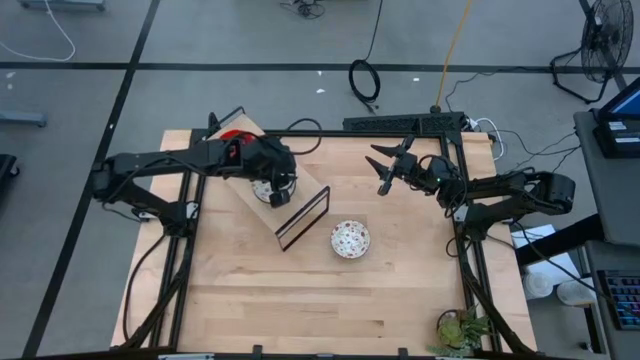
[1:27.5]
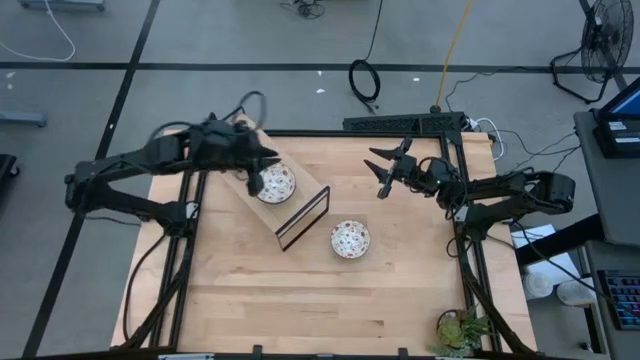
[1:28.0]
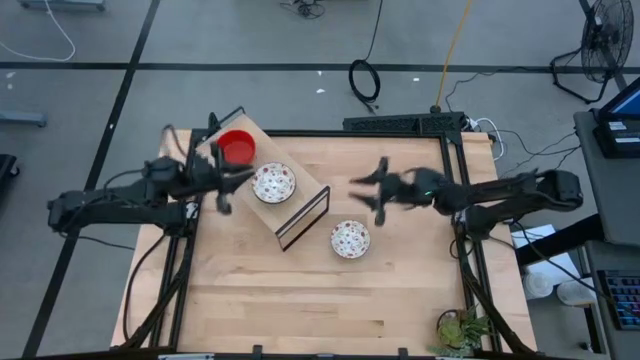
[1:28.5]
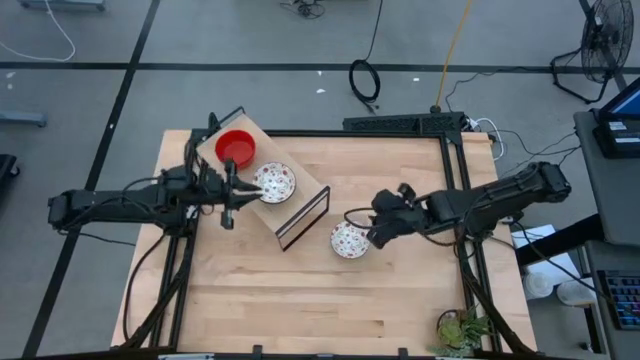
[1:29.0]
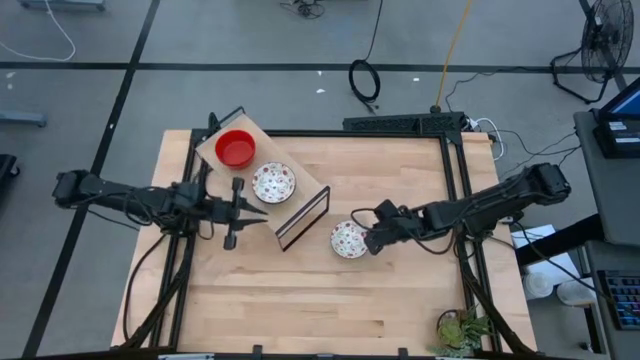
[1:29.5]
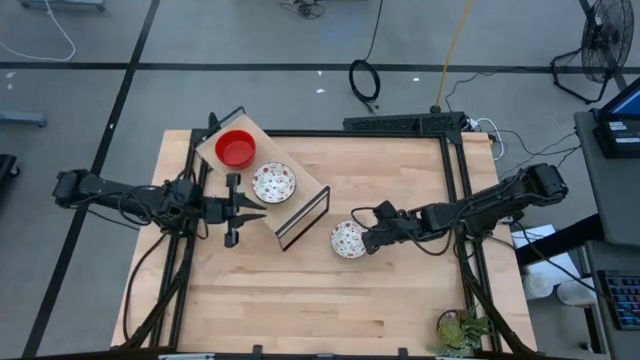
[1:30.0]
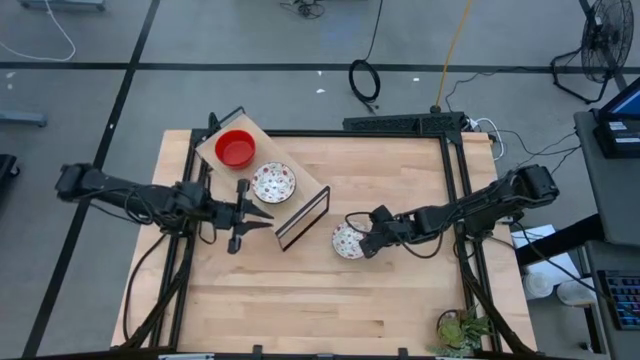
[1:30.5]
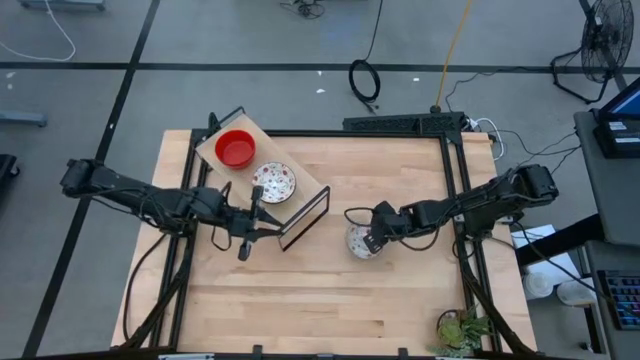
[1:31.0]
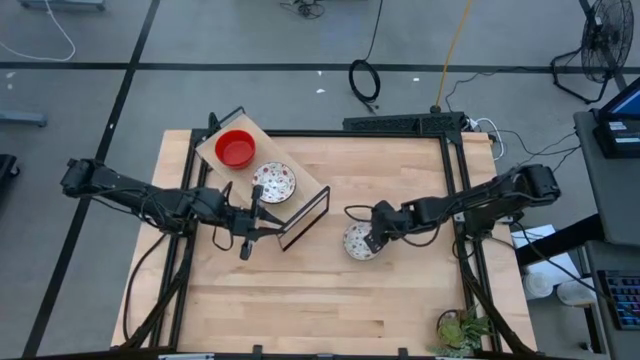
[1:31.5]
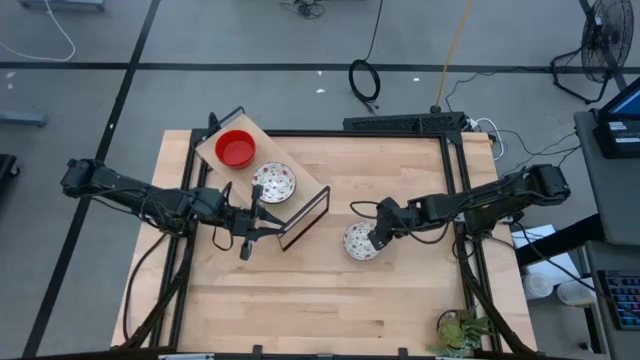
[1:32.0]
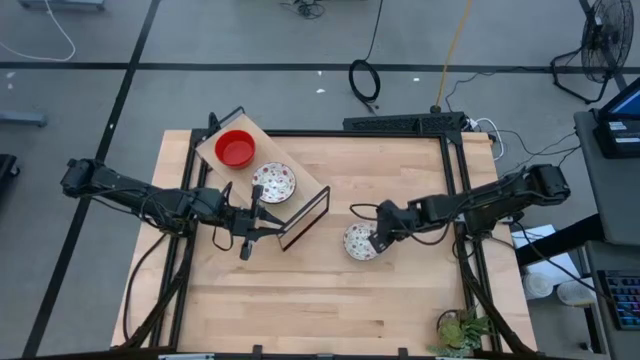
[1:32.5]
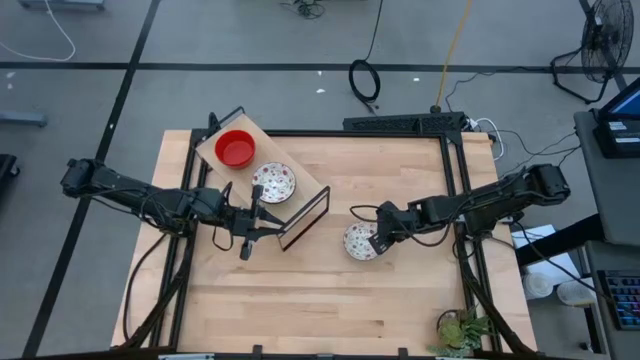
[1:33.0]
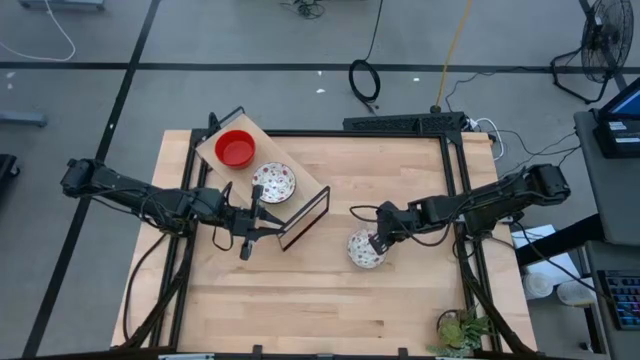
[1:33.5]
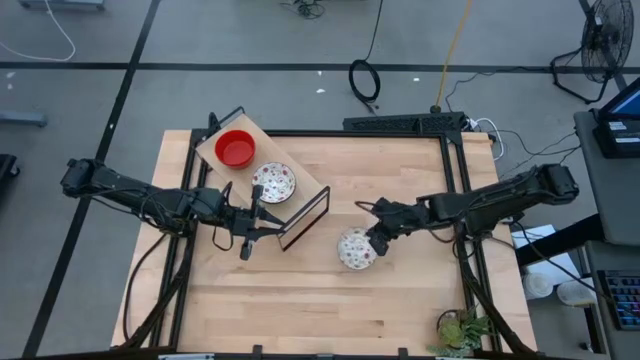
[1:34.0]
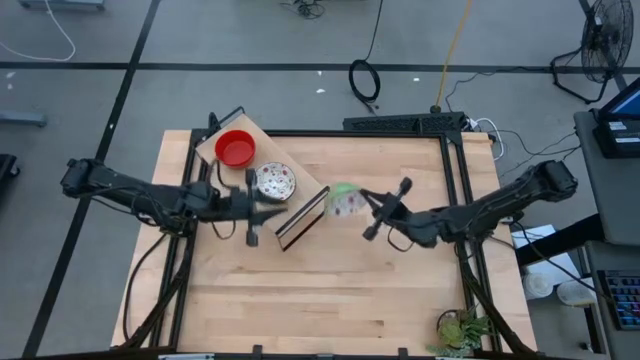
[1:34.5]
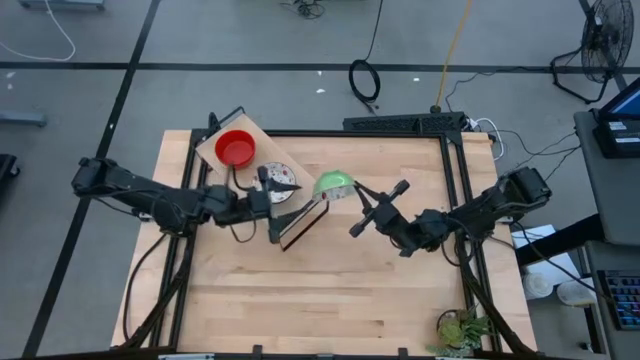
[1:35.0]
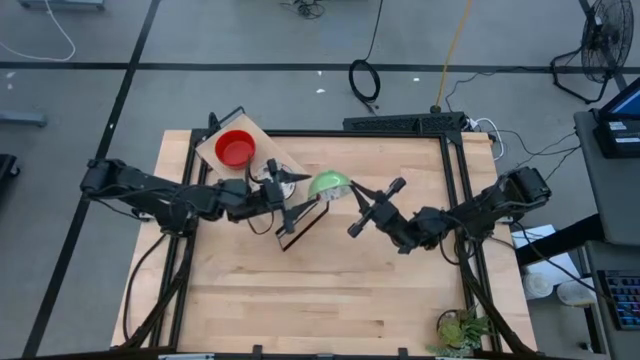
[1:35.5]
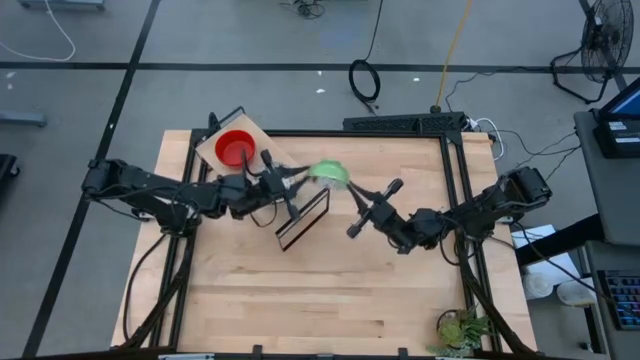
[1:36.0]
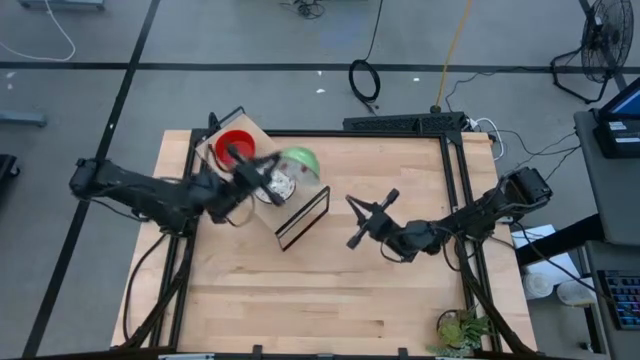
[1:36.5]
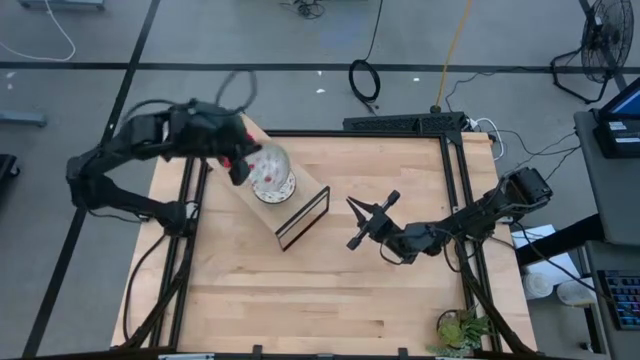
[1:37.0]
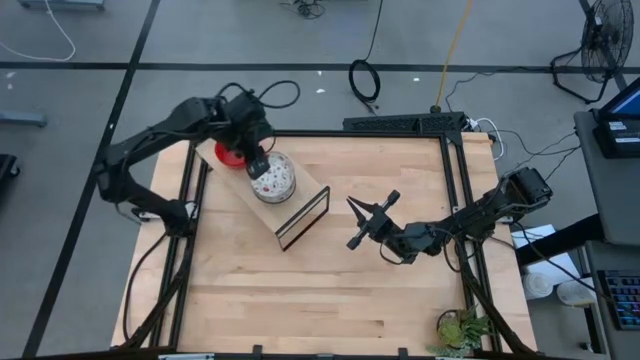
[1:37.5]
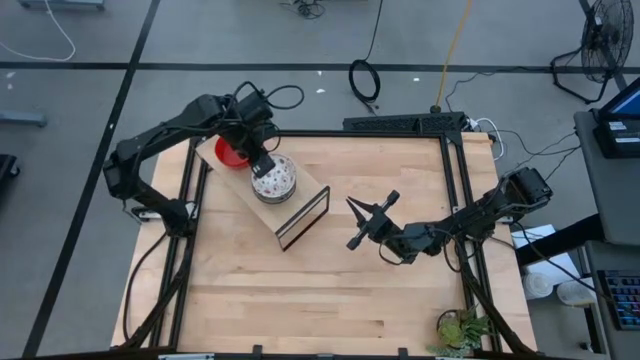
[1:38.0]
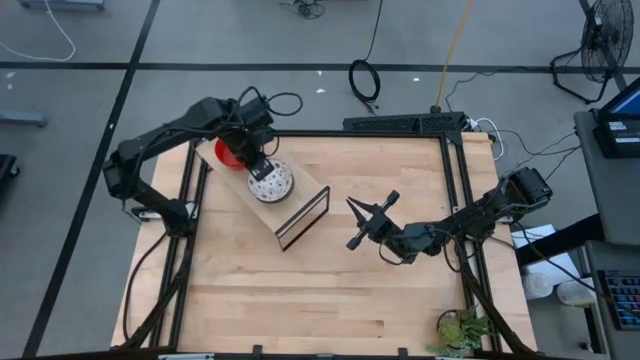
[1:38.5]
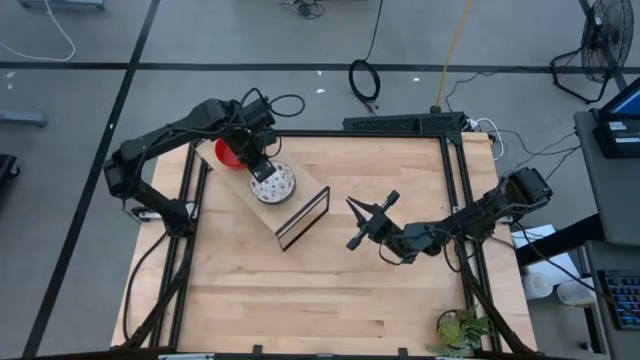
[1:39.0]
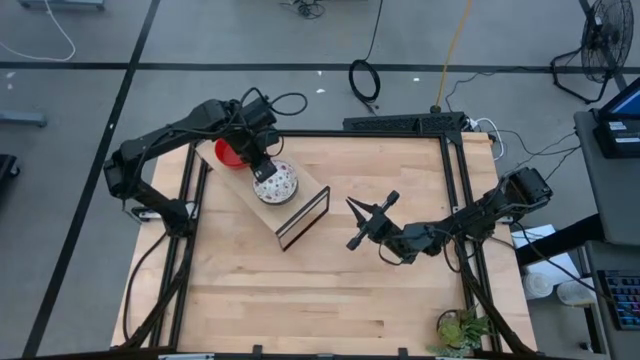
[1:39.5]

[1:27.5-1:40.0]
Task: Pick & Place Mini bowls
Stack the white patterned bowl on the white patterned bowls on the shelf

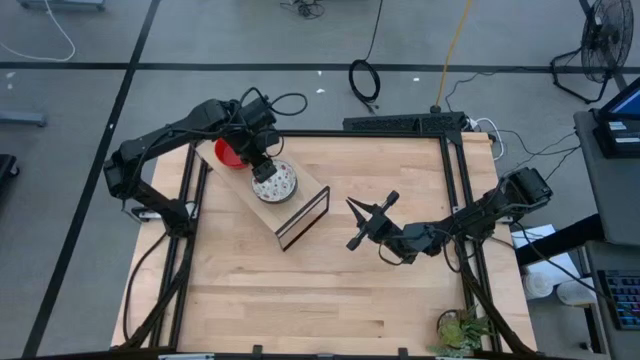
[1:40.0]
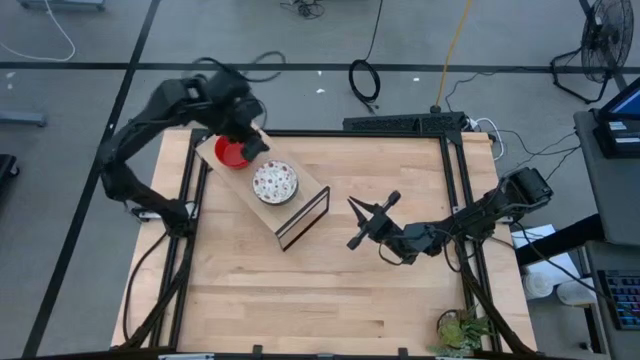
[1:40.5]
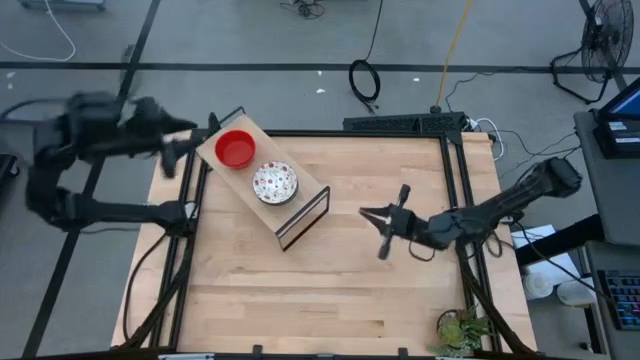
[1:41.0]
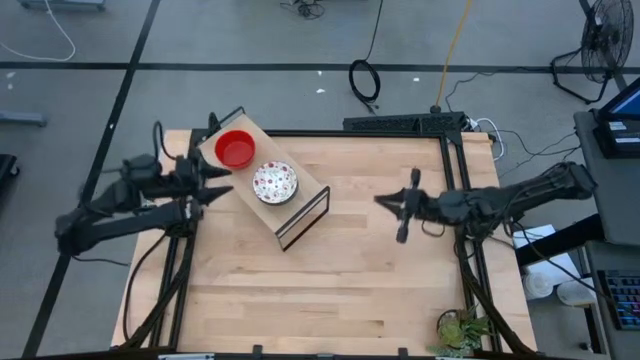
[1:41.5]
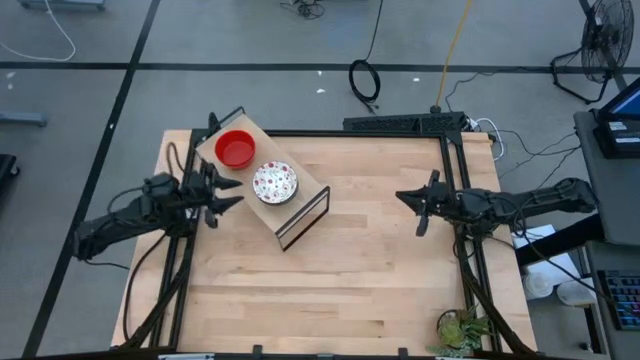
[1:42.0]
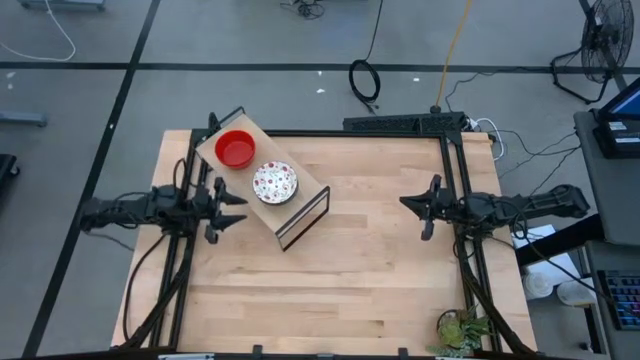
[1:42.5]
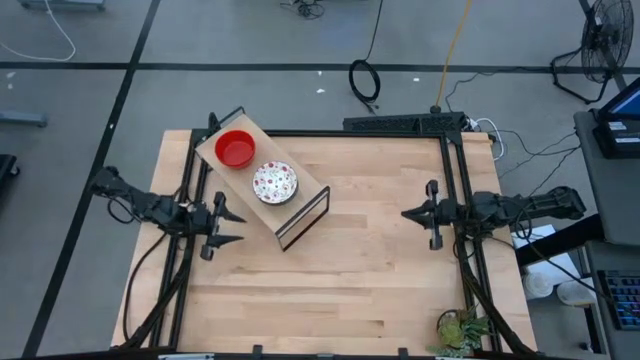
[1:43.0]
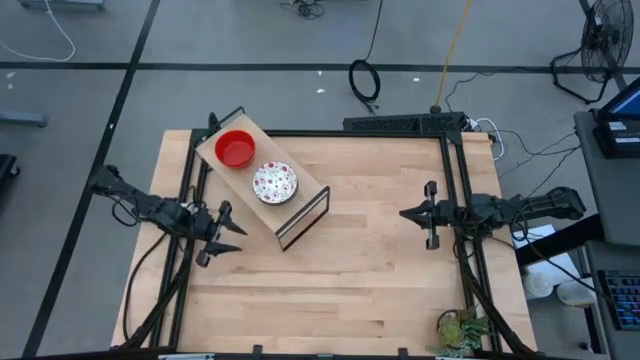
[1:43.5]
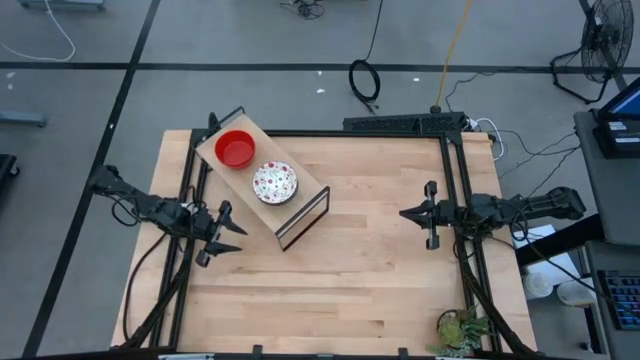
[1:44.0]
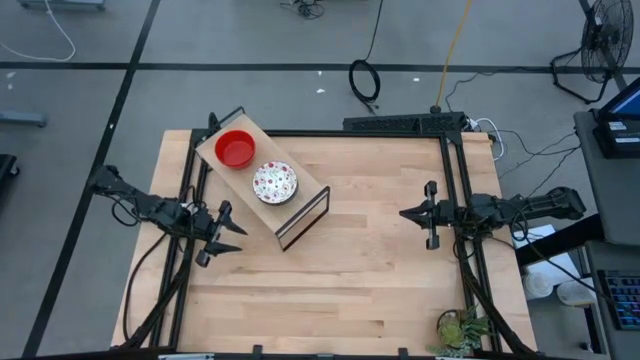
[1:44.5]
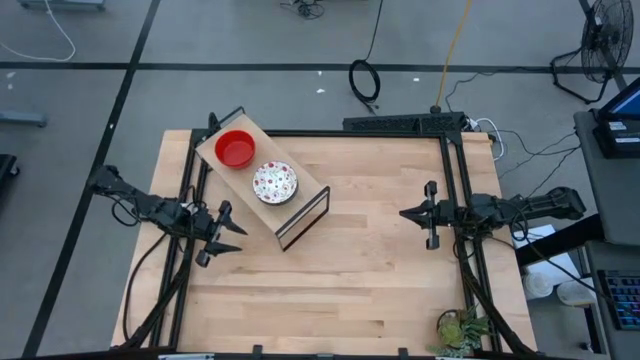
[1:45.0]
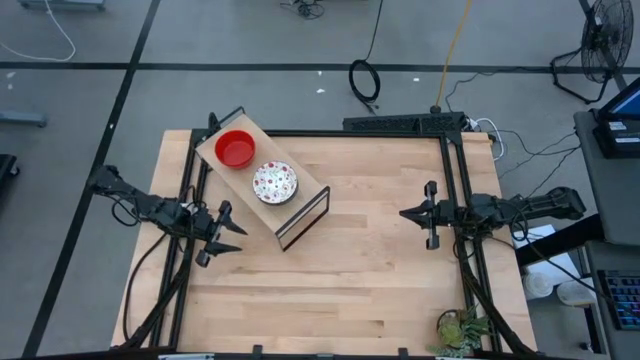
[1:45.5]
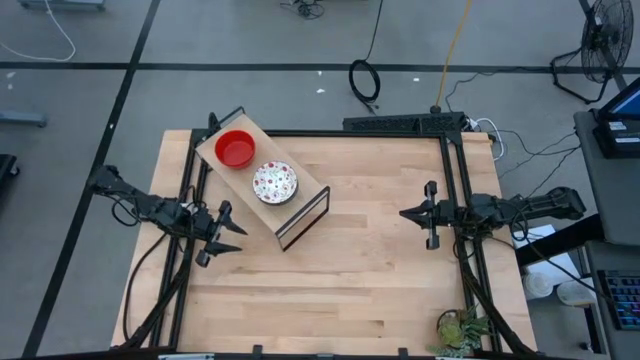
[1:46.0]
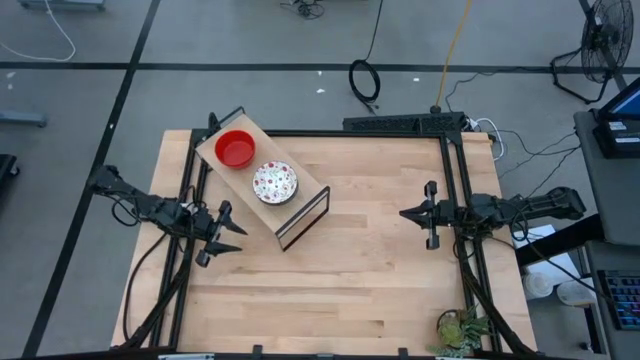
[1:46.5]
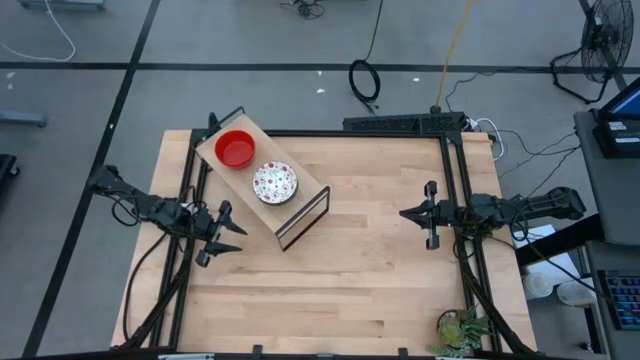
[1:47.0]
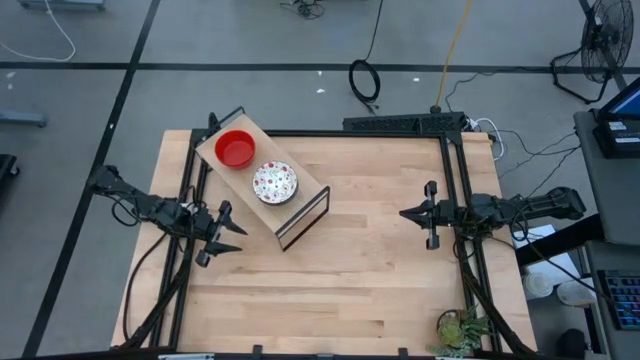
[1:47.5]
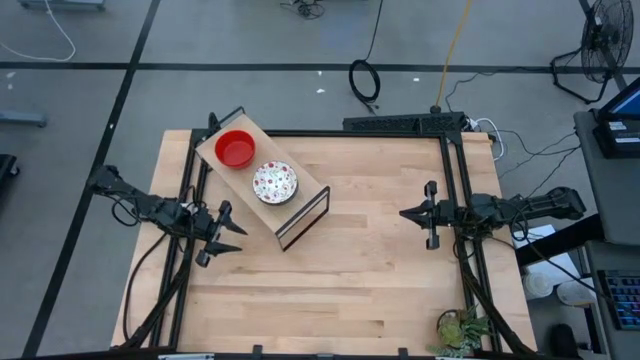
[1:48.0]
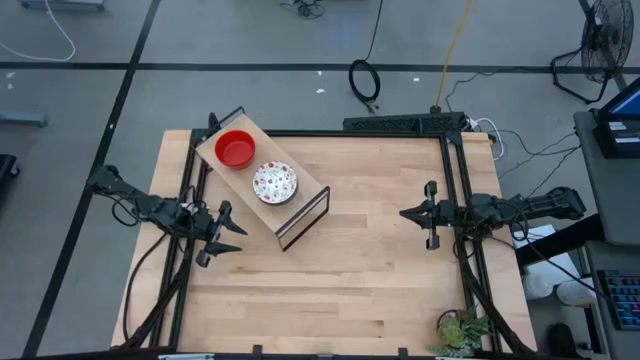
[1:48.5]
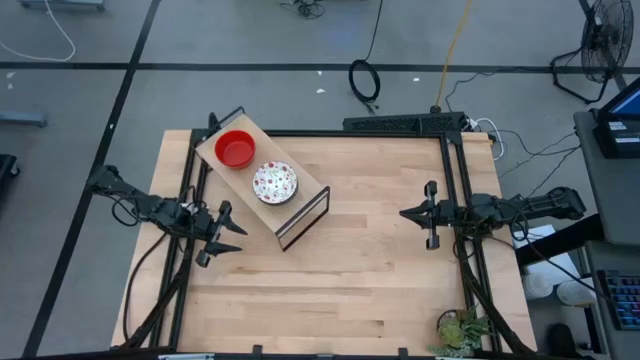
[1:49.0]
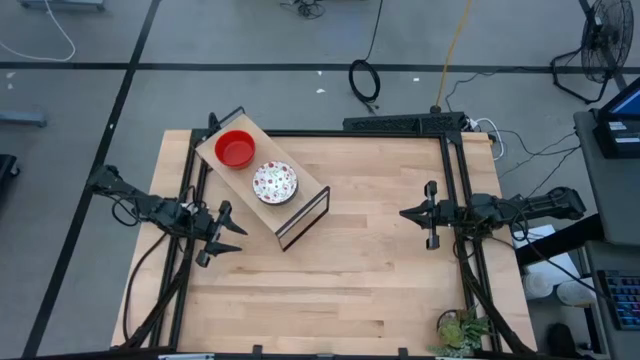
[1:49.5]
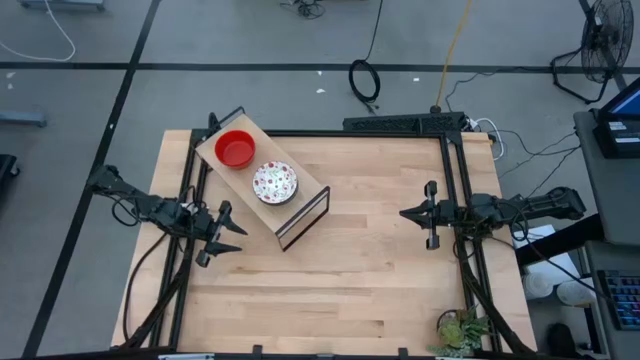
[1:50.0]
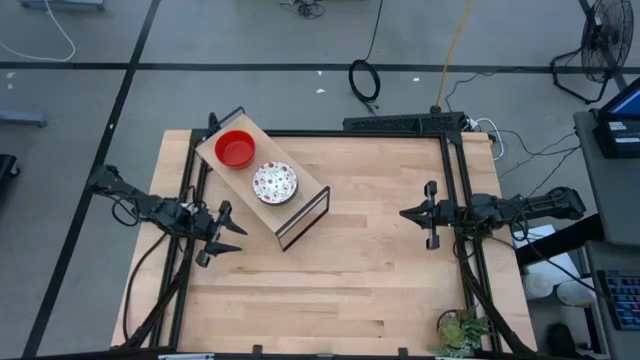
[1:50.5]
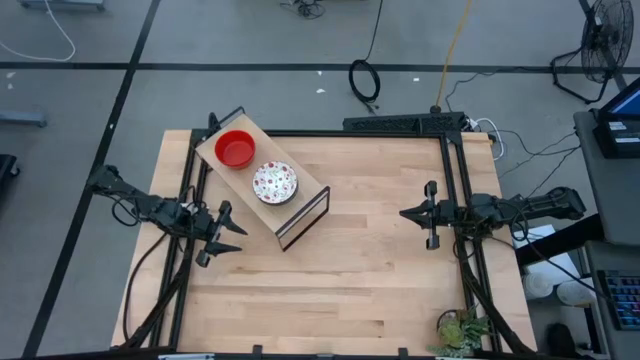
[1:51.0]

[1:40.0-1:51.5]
Return to Home Position
